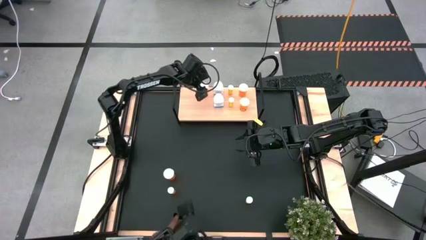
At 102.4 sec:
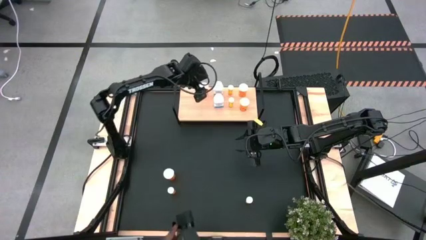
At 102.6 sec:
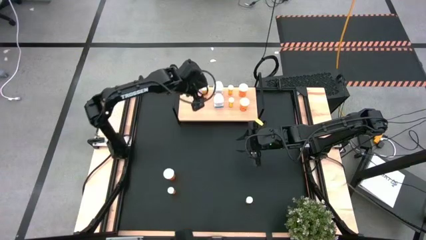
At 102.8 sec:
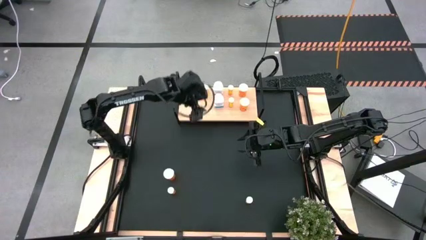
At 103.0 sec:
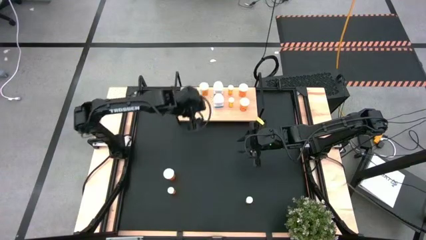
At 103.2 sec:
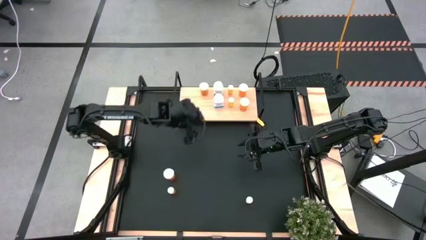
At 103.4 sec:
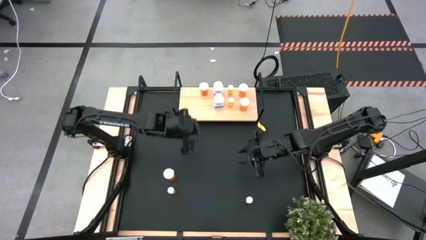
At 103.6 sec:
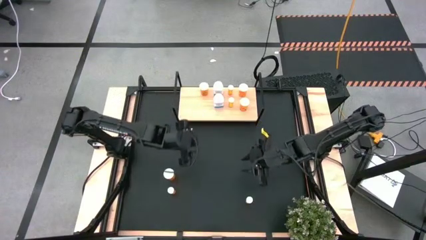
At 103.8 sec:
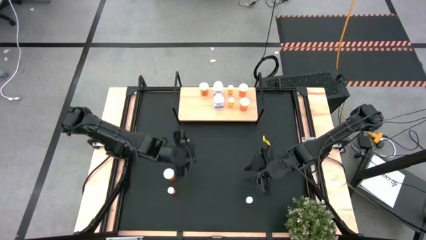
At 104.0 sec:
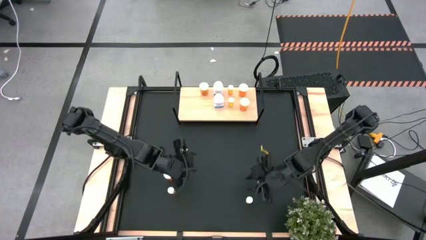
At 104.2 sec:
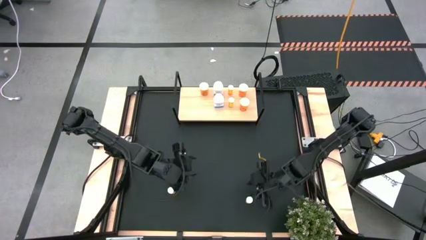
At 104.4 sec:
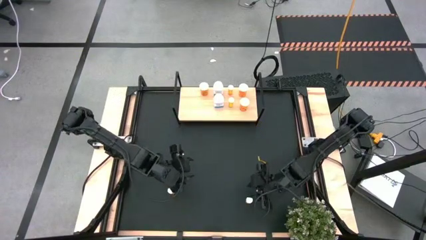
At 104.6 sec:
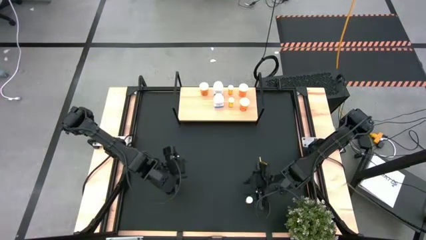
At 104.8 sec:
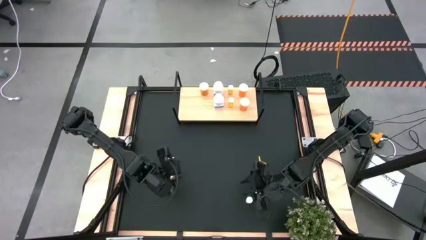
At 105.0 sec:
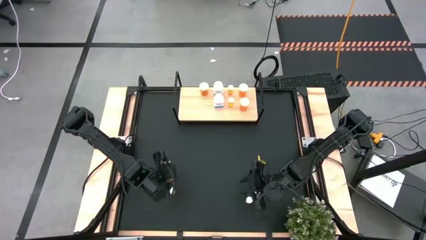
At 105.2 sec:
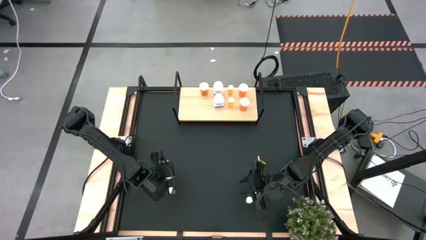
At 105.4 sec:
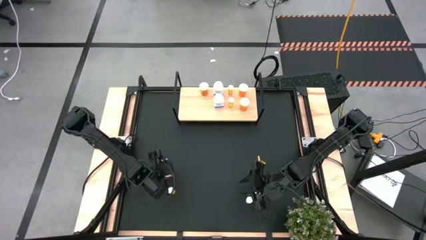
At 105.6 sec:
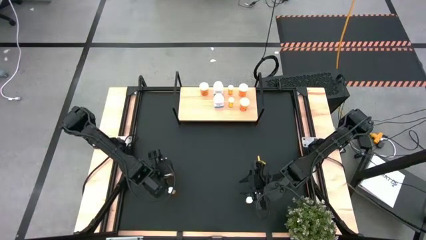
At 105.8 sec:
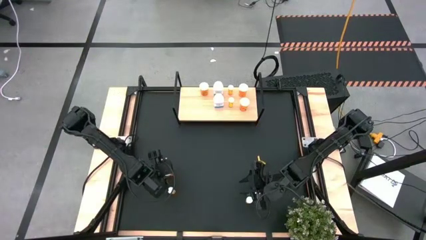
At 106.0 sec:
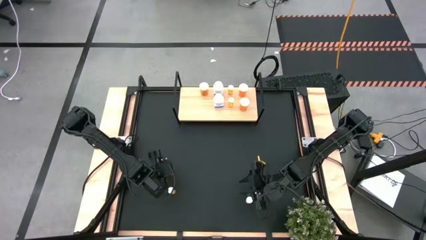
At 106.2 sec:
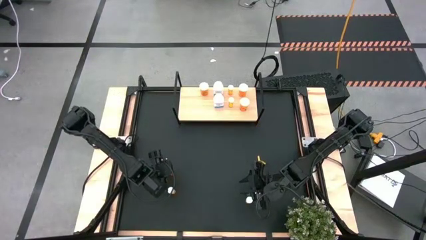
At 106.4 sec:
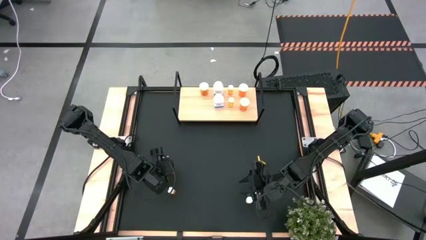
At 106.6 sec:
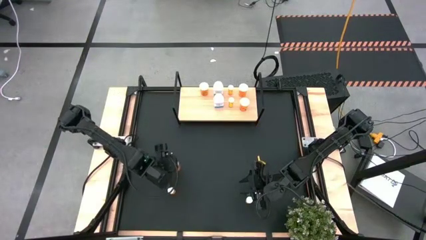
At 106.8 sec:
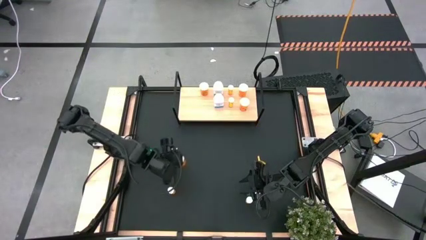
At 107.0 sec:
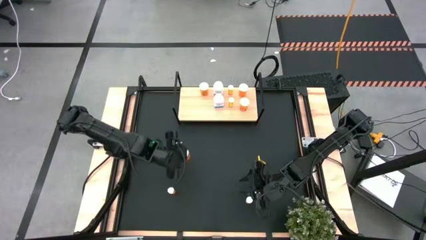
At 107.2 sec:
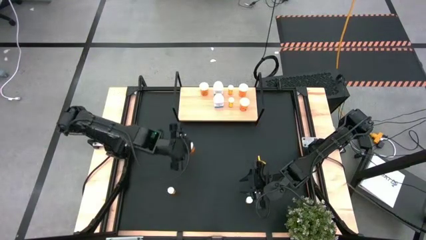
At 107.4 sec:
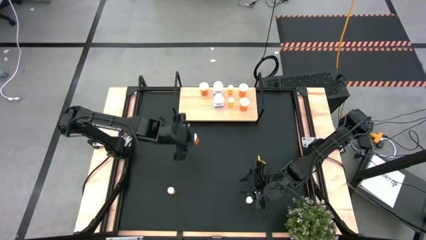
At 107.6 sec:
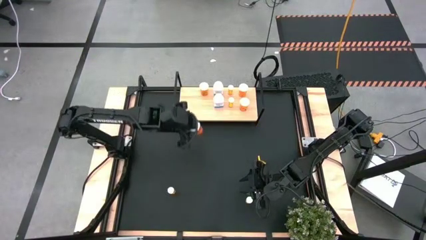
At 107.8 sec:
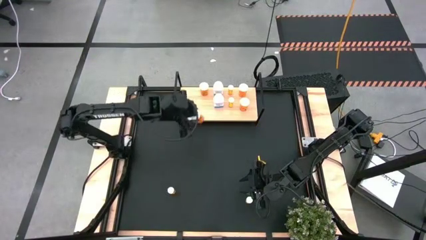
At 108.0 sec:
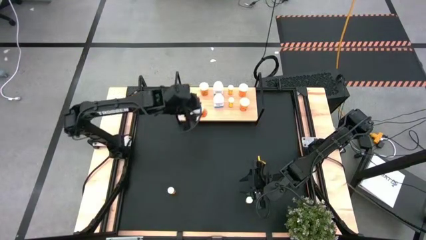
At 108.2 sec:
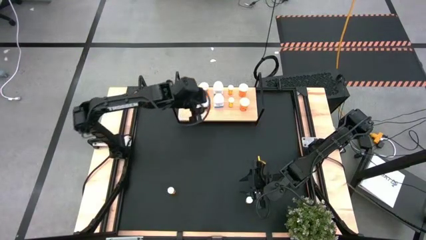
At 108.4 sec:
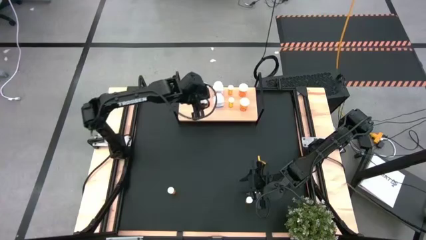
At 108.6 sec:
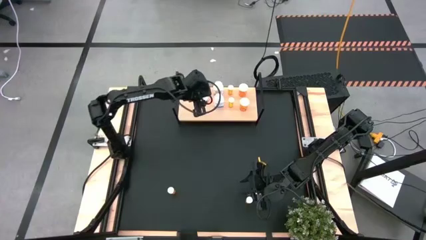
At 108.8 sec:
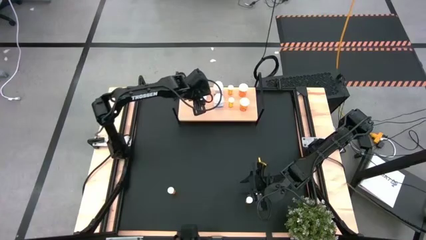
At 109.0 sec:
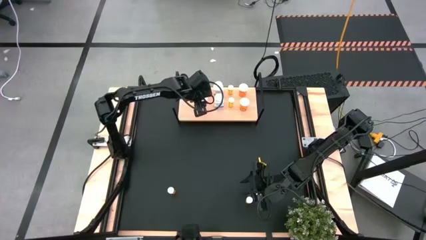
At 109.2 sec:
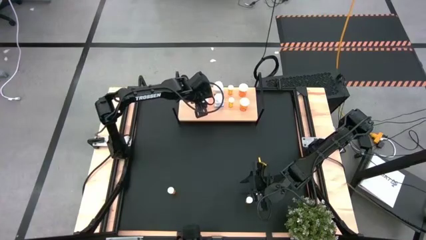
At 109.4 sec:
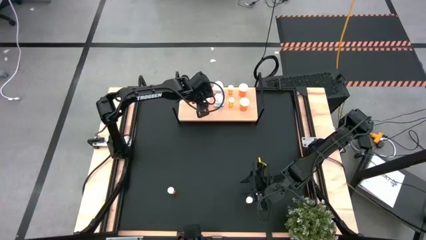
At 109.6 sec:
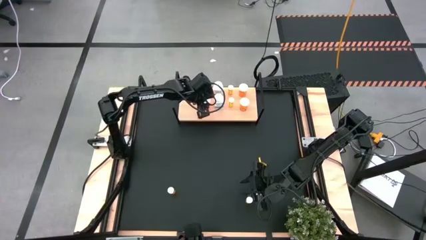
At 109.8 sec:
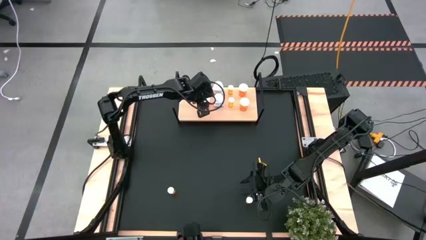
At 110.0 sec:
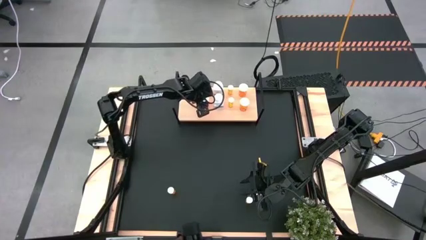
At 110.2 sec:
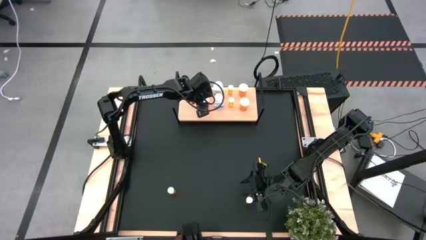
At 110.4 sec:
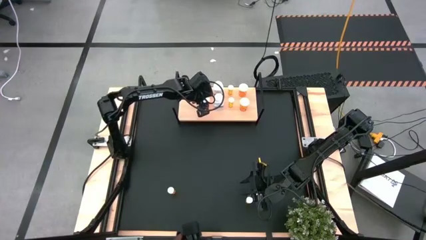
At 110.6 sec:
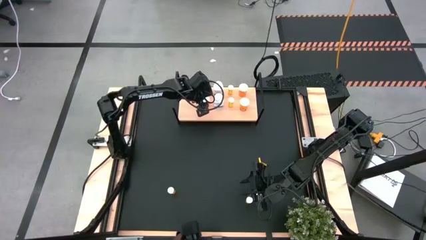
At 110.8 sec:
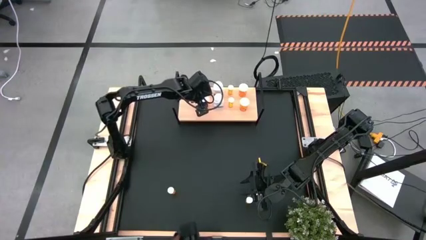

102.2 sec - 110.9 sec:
Task: Pick and place medicine bottles onto shelf by color
Put the big orange pill bottle aligned with the other big orange pill bottle on the shelf

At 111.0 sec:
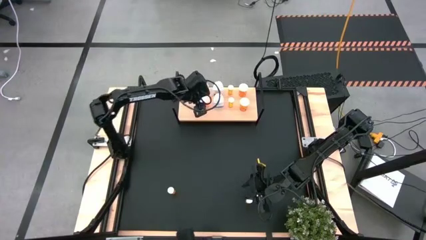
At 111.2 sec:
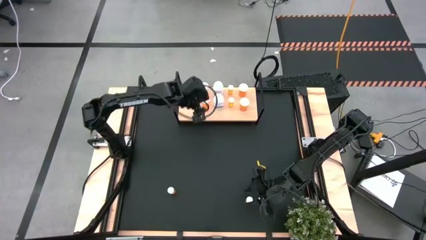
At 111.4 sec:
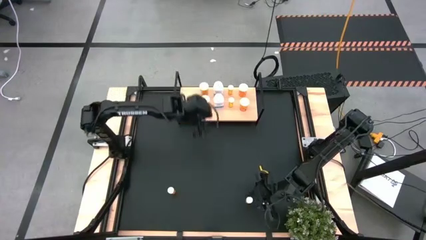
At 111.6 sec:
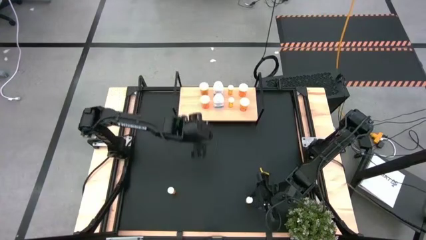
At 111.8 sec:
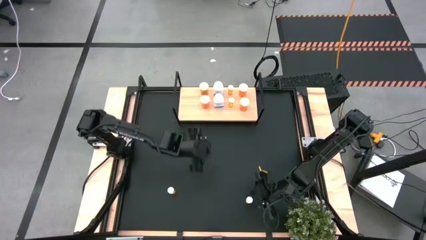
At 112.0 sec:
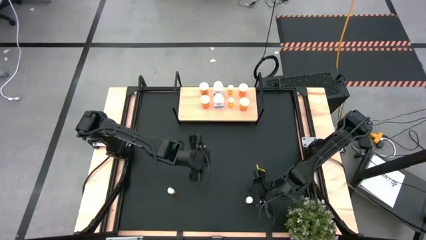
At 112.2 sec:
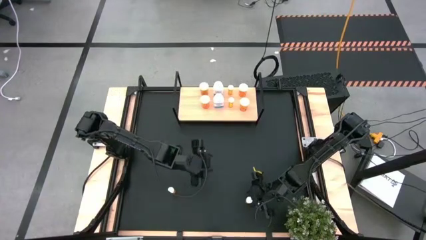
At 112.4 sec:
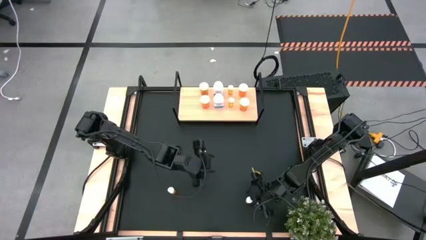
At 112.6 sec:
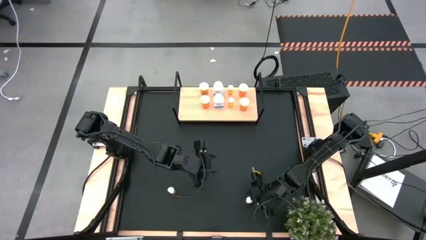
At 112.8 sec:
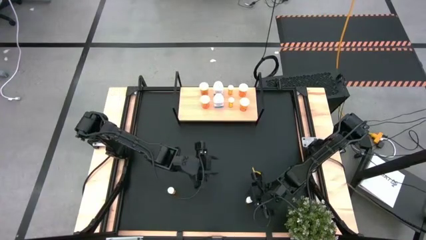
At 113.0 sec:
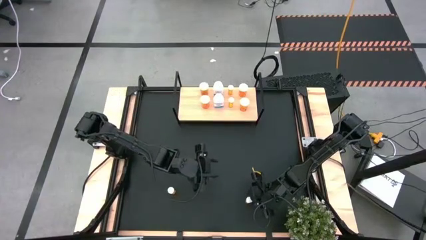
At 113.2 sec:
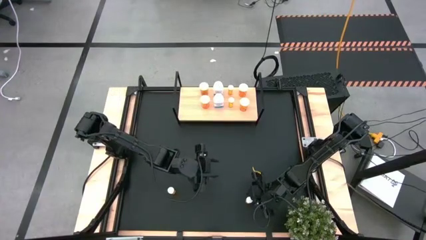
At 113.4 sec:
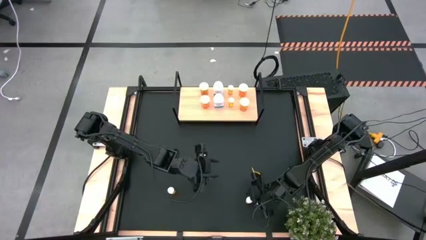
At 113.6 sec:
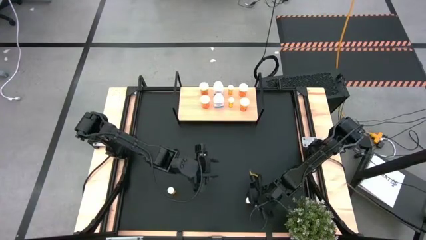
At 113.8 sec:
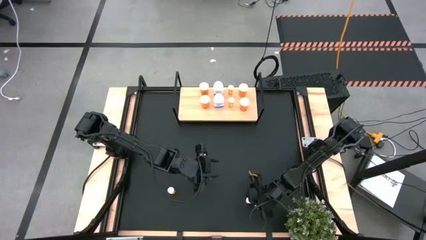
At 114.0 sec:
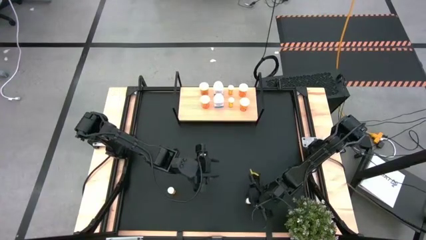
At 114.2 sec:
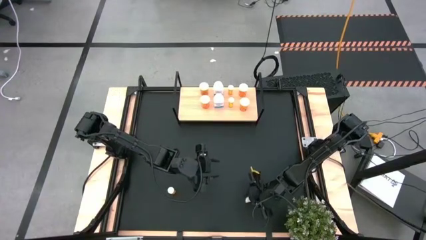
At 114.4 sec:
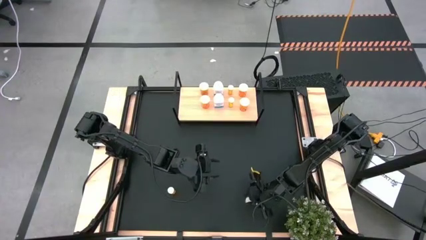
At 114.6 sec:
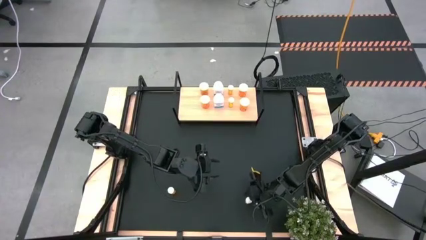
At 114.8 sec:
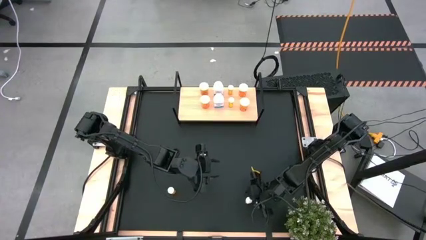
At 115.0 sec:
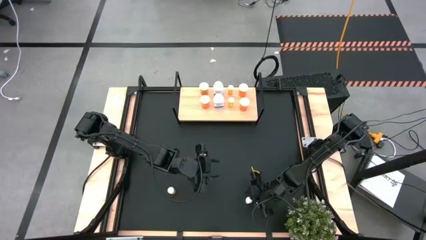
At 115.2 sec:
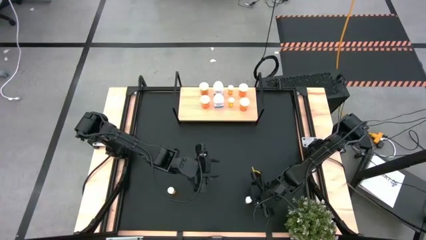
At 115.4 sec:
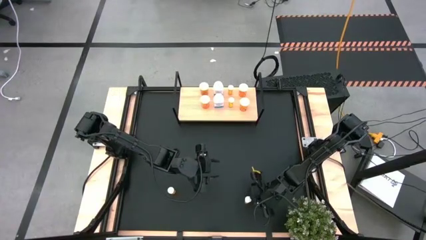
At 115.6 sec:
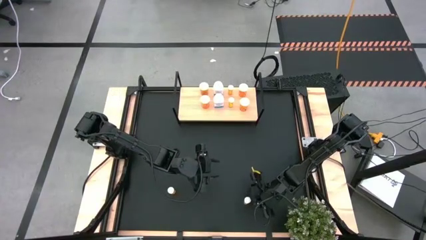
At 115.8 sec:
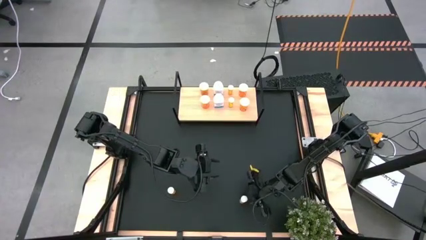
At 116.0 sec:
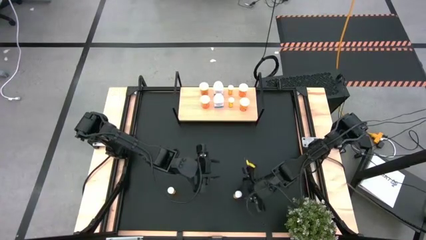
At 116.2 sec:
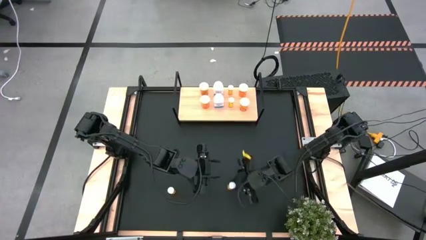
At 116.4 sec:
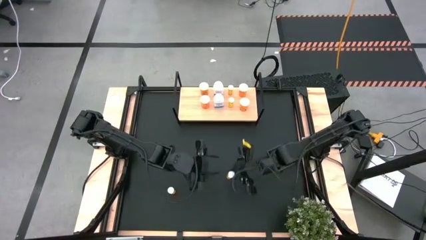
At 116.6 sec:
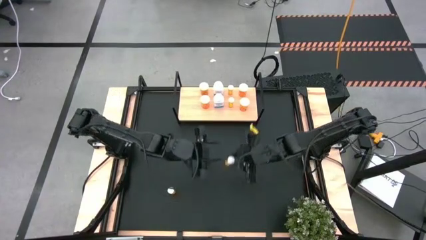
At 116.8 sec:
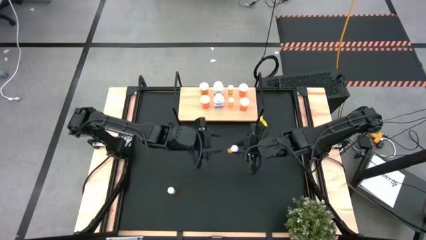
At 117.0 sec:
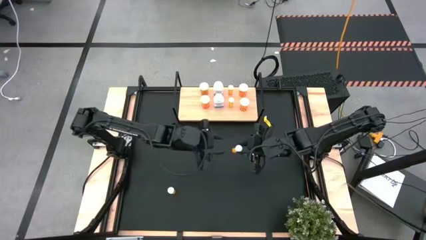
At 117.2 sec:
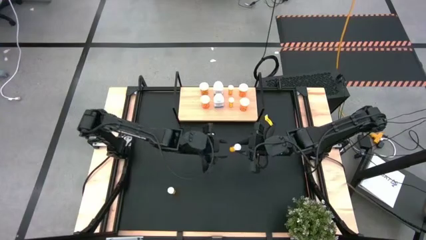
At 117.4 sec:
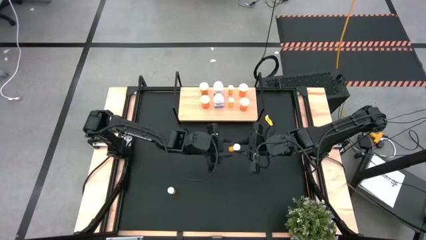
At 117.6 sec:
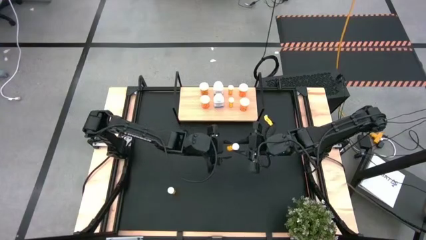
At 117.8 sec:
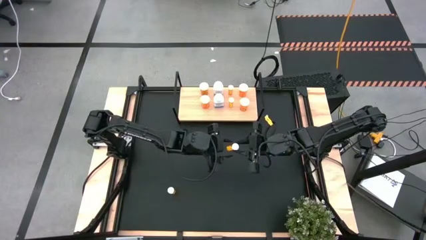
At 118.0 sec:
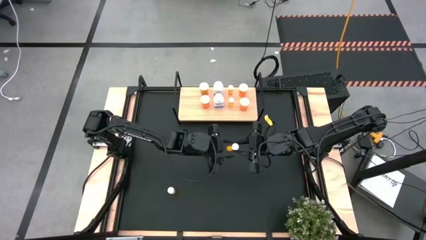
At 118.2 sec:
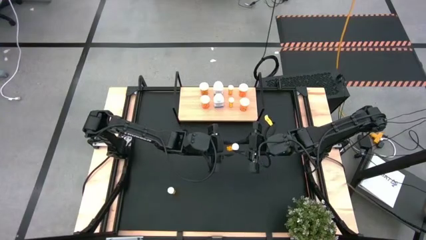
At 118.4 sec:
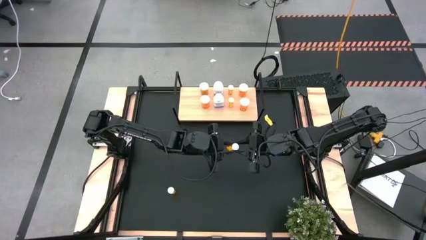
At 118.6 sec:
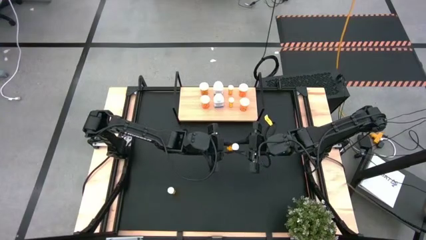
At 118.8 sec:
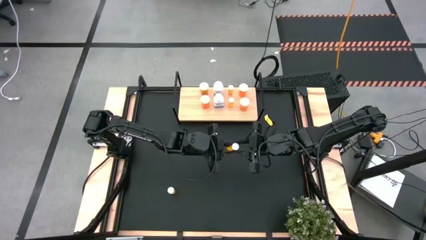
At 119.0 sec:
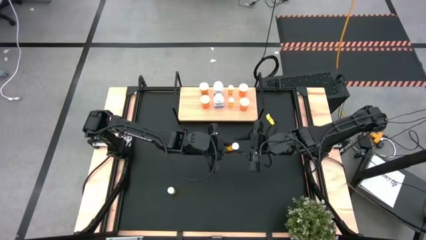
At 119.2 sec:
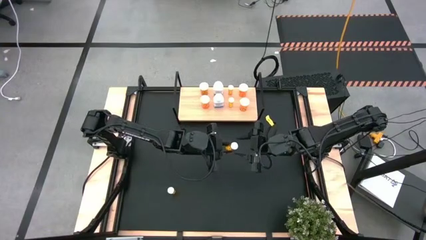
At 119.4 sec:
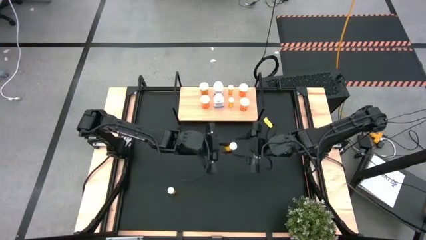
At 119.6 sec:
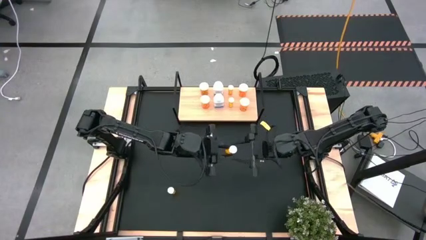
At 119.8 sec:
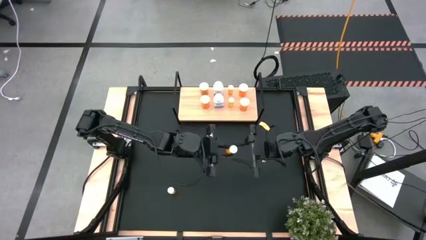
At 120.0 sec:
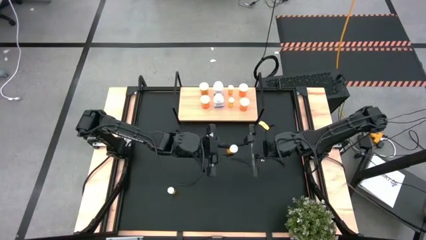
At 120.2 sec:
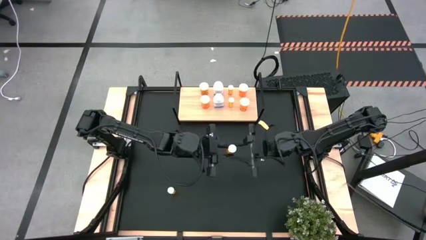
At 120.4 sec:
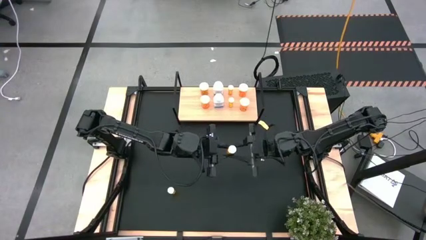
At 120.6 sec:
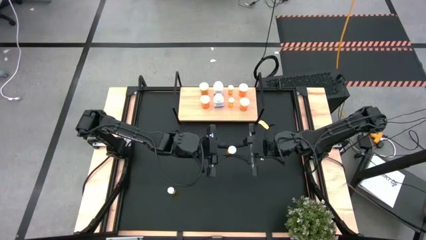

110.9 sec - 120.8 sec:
Put the right big orange pill bottle on the shelf
